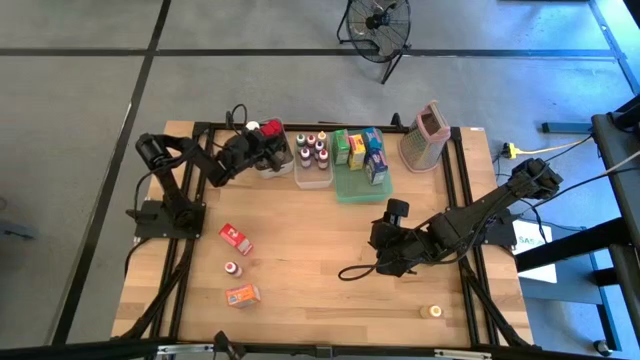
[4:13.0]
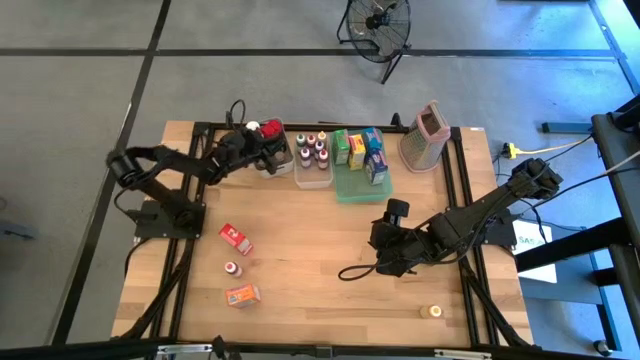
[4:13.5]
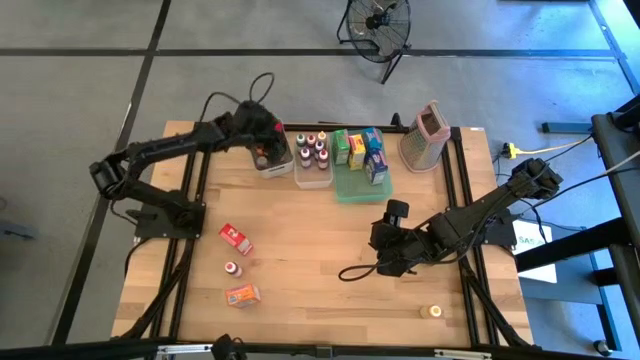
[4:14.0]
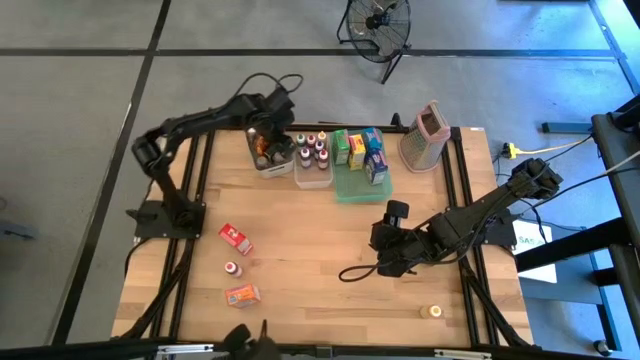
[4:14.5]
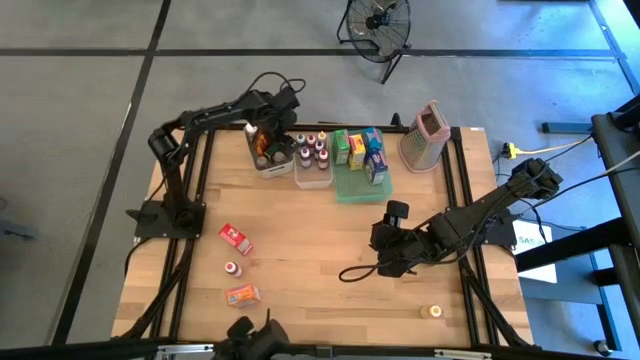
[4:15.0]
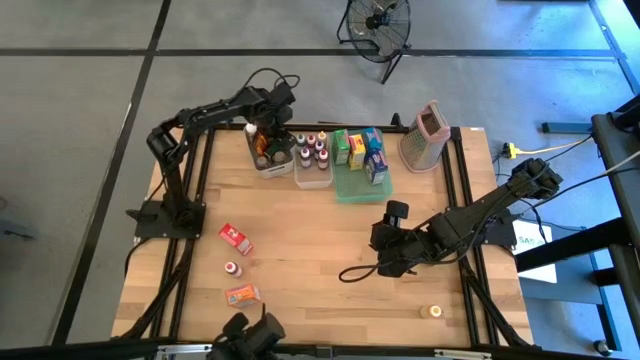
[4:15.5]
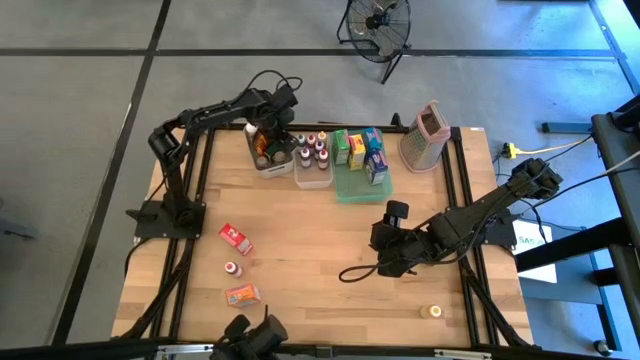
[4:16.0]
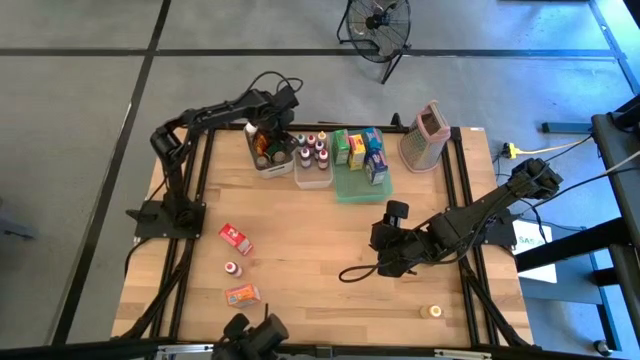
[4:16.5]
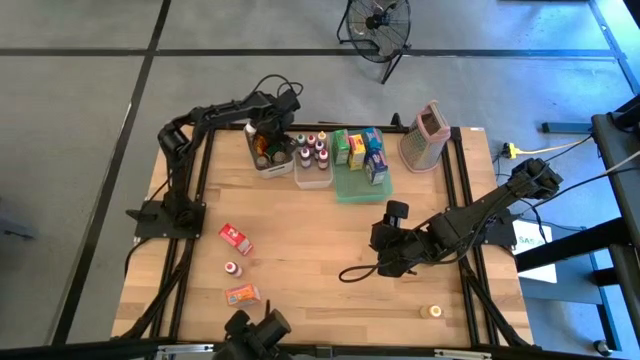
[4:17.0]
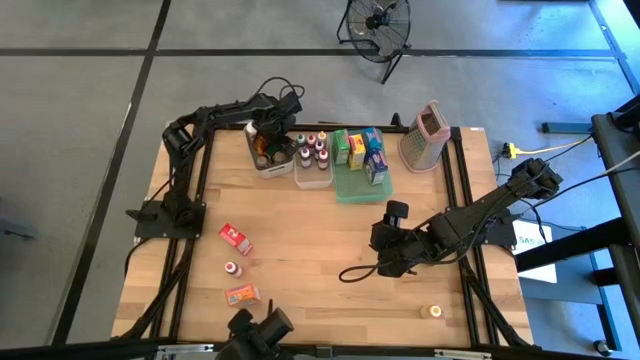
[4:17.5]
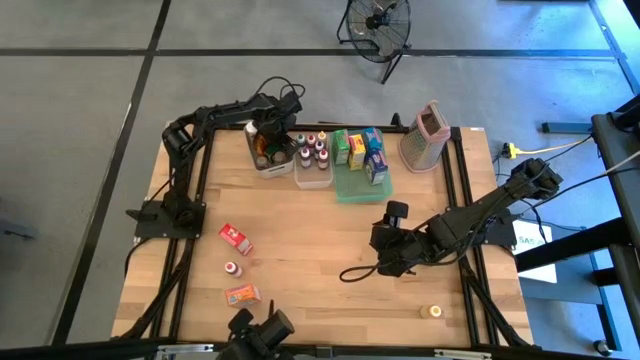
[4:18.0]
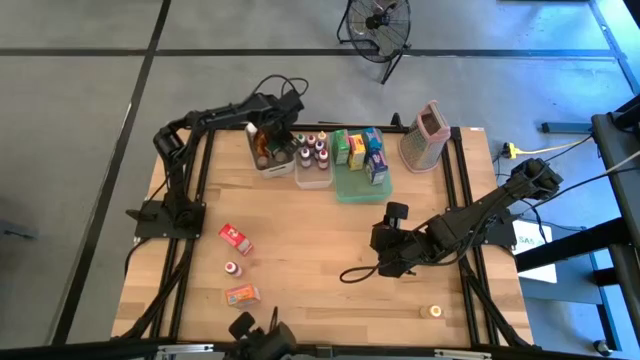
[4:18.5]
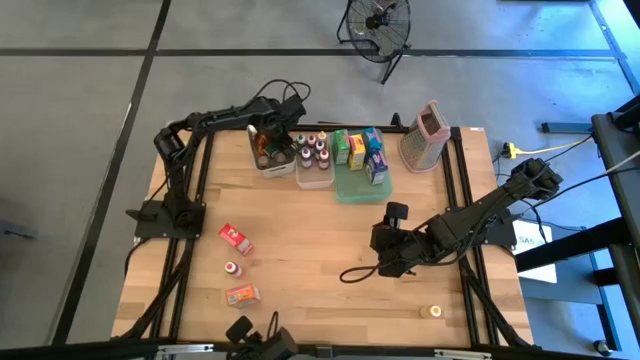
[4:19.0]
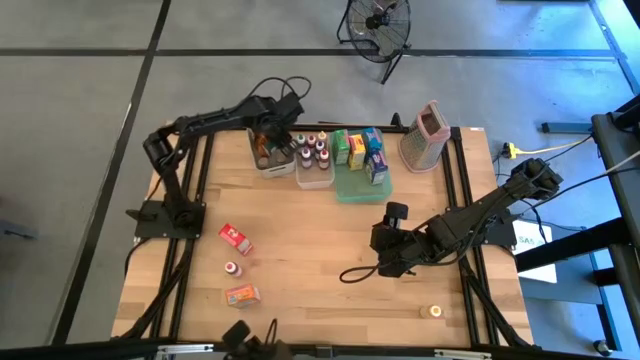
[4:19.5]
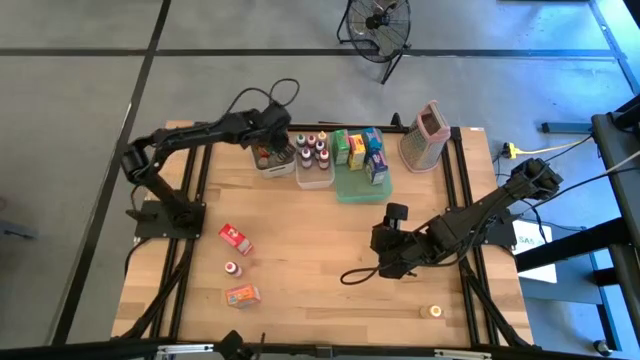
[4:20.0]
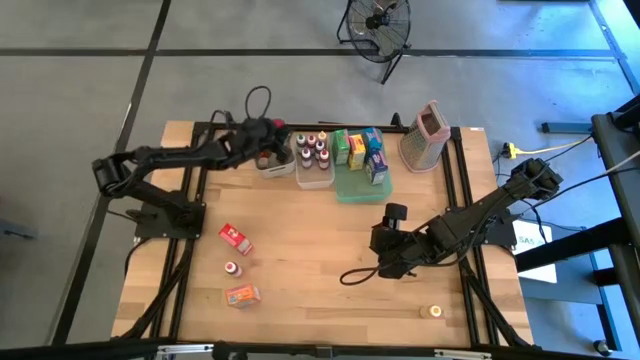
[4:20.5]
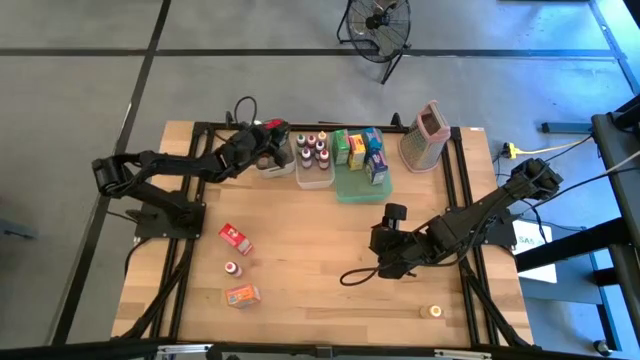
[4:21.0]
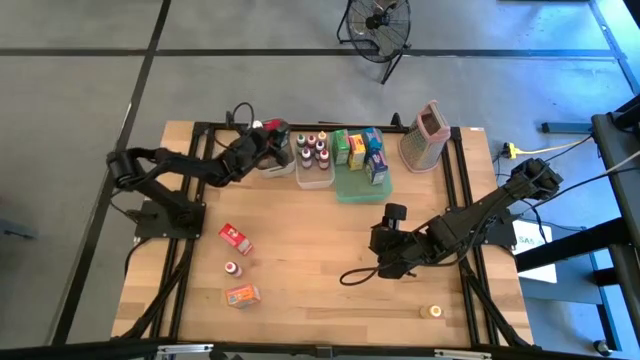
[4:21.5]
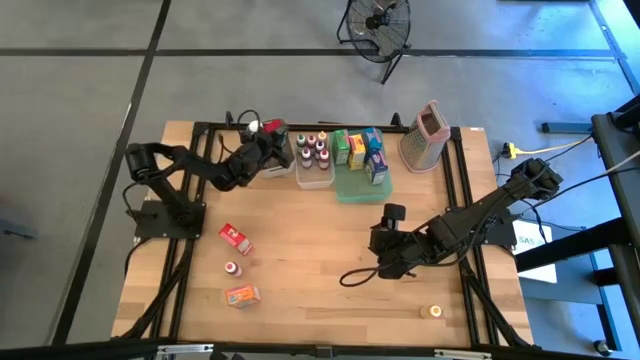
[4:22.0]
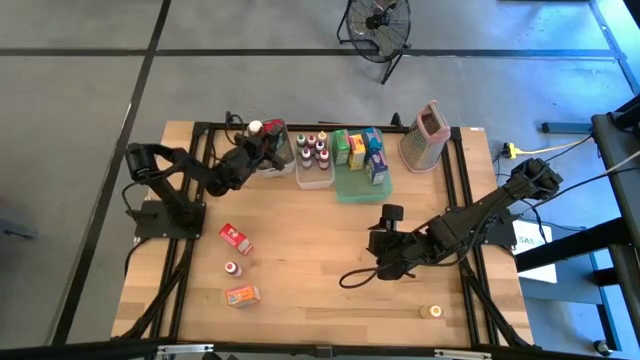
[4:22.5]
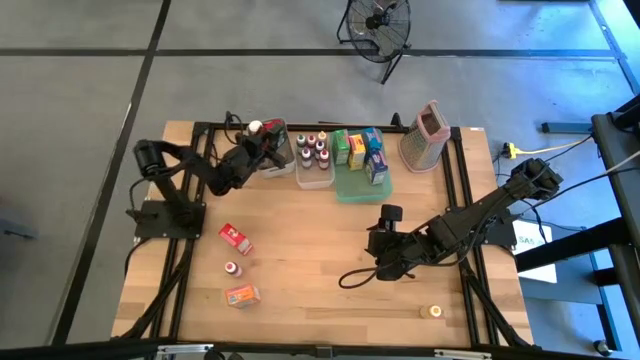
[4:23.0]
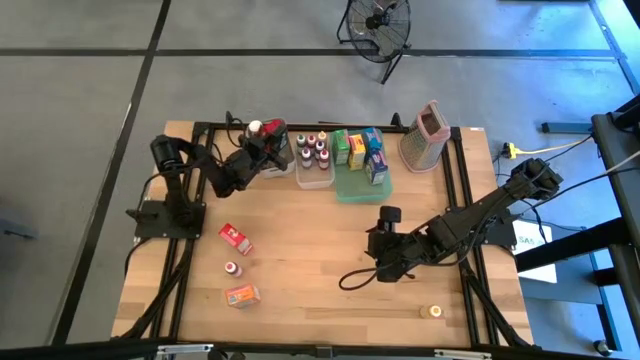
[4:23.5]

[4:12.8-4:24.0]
Task: Pick & Place Kitchen Items
Put the black seasoning can into the gray bin

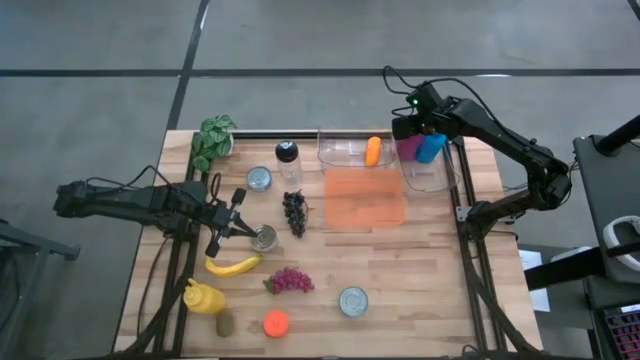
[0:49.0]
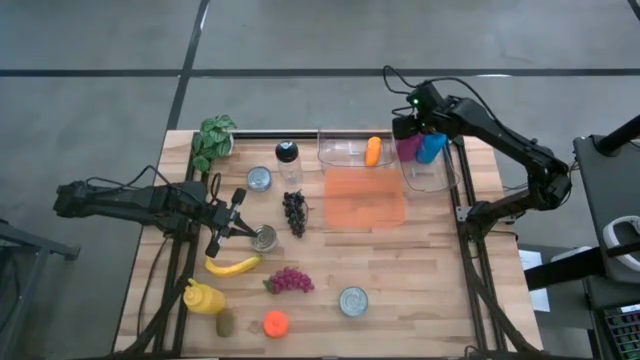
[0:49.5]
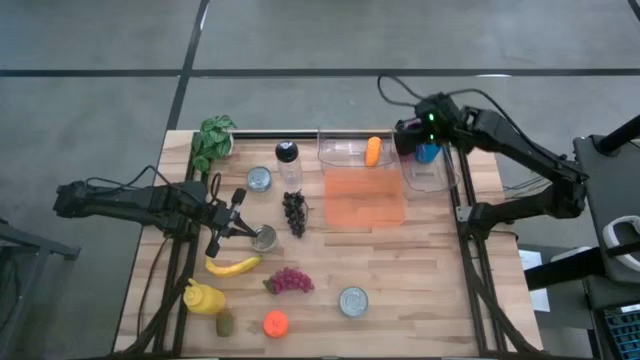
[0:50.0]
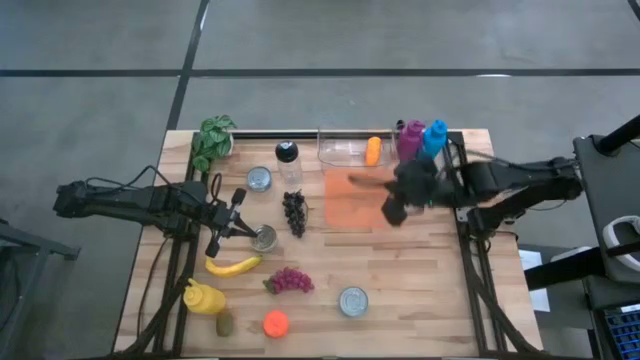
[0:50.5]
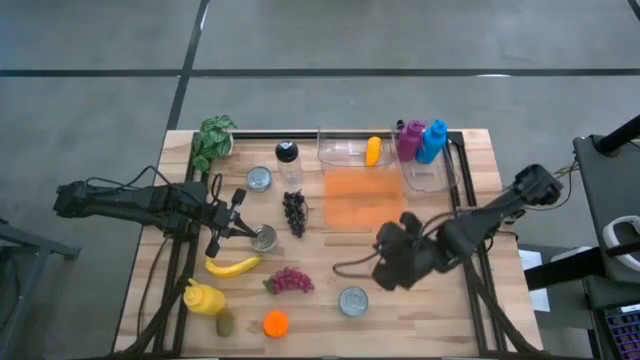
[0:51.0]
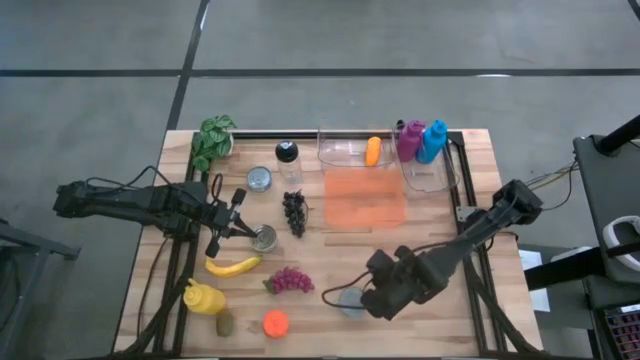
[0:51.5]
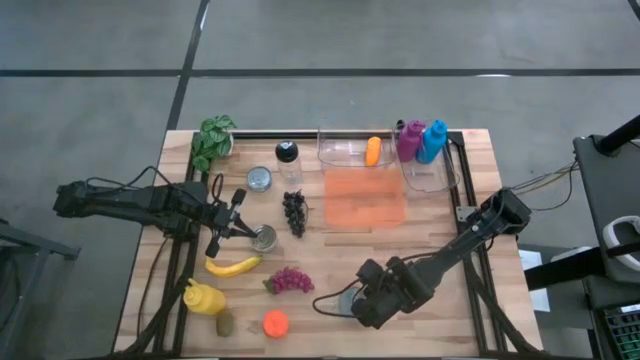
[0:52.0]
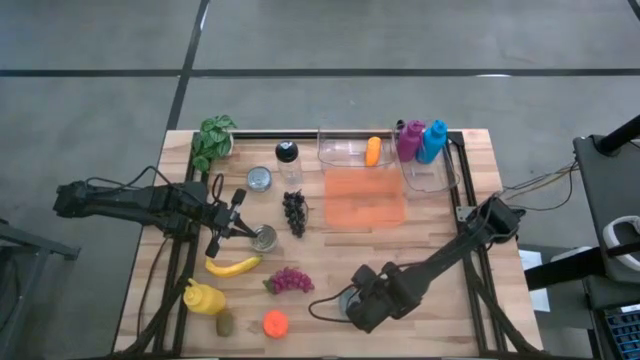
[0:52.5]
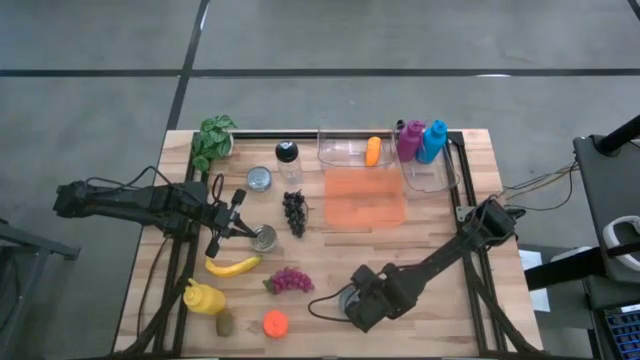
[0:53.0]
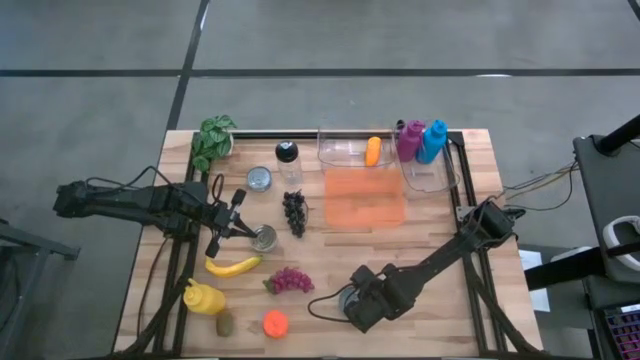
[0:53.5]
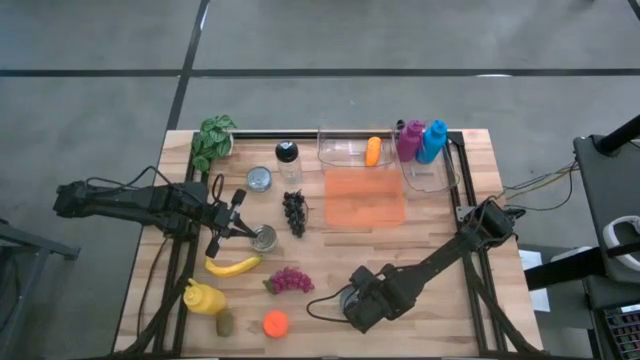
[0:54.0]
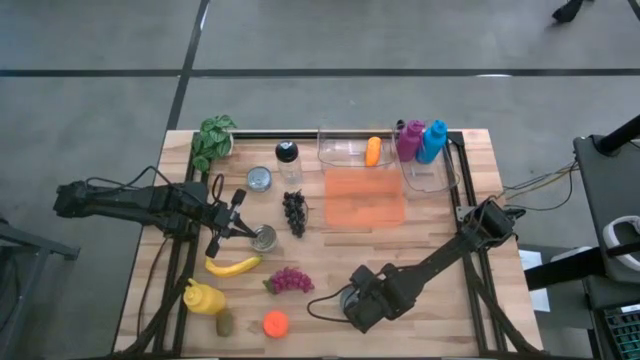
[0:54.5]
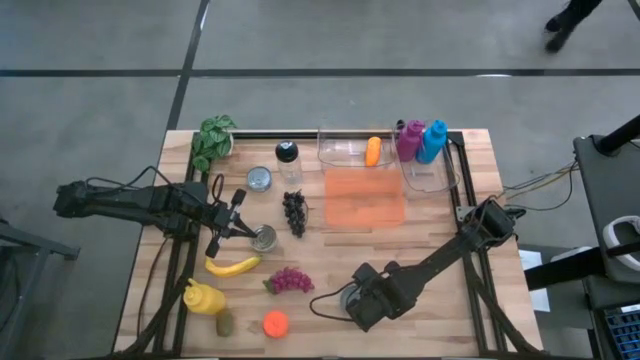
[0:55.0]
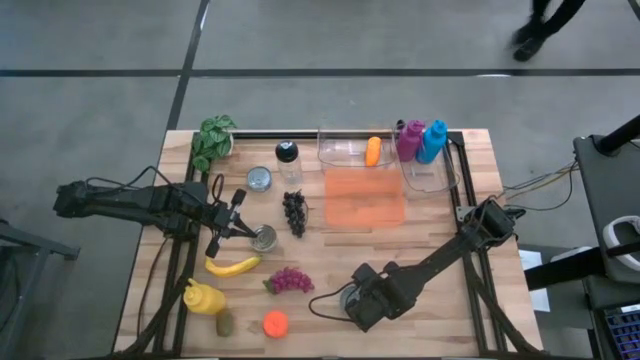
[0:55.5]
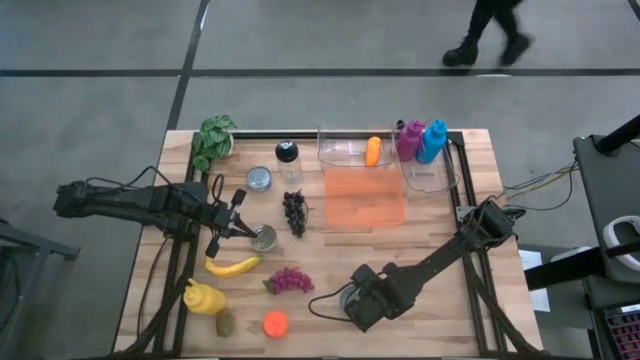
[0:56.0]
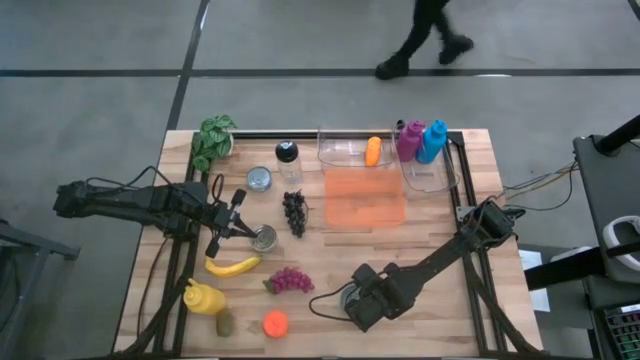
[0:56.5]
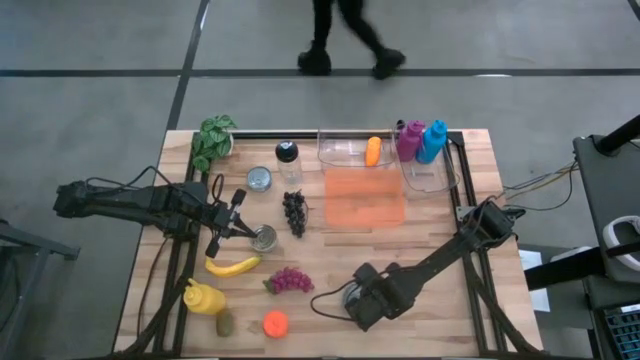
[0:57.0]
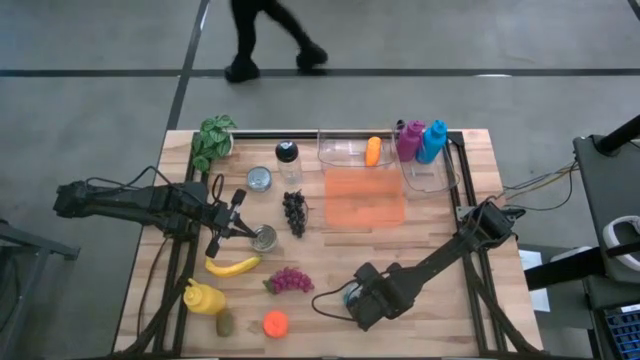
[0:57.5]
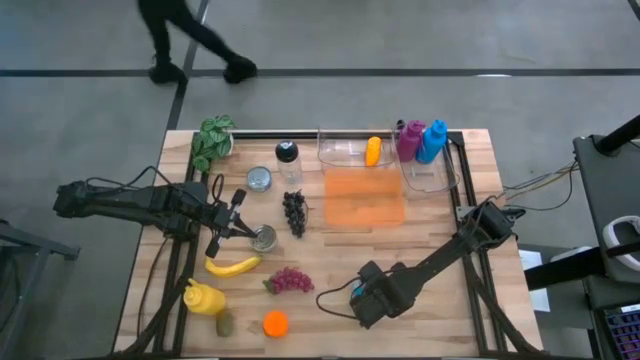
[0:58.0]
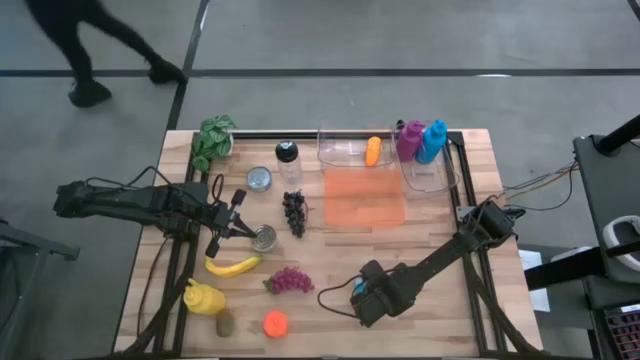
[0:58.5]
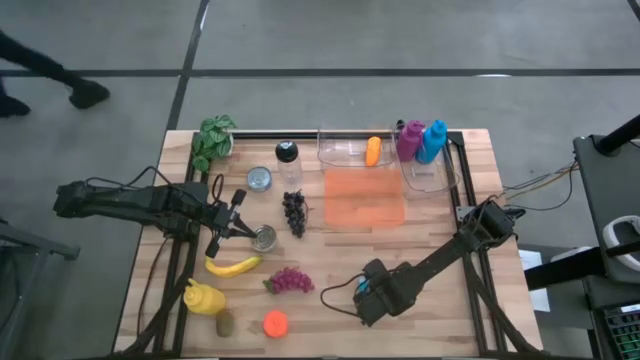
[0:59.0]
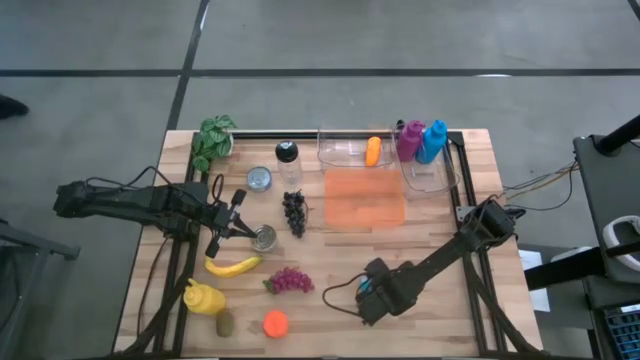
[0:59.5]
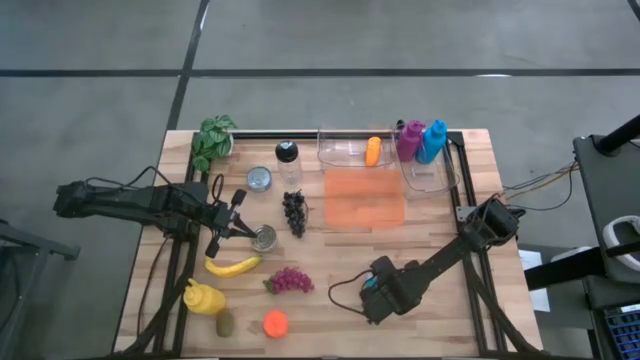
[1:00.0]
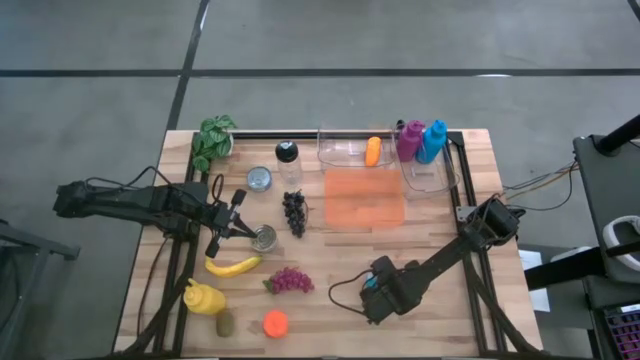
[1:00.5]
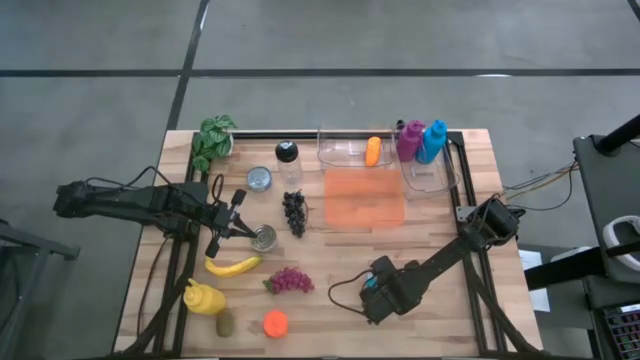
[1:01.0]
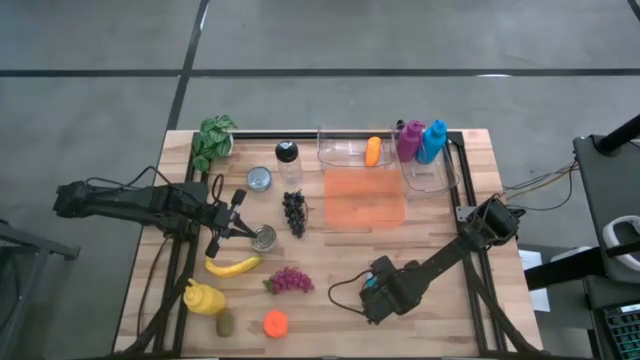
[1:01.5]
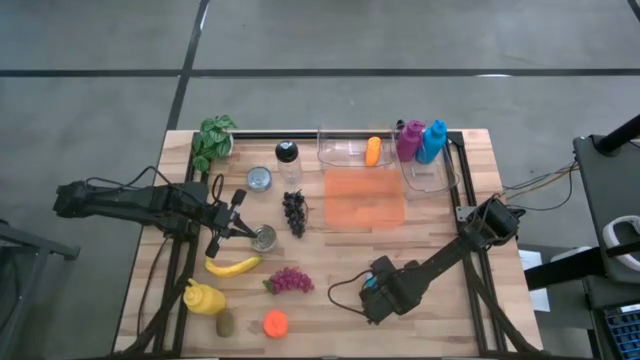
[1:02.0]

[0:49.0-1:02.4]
Task: Pick & Place Food Item
Put the blue and yellow tuna can into the orange bin
